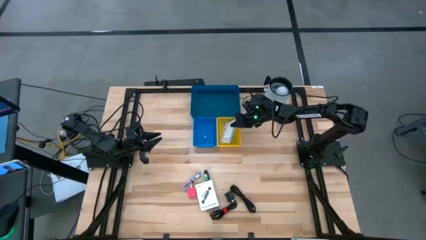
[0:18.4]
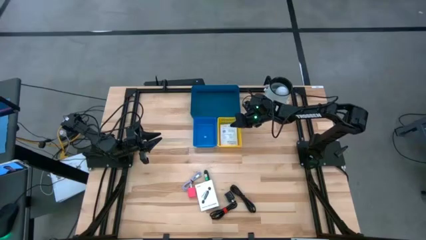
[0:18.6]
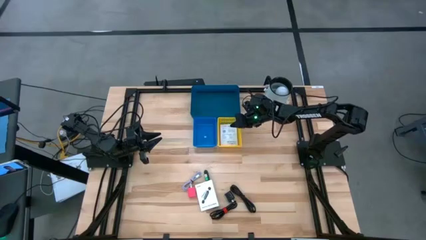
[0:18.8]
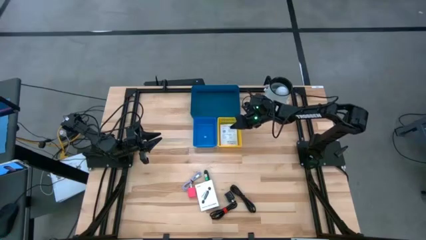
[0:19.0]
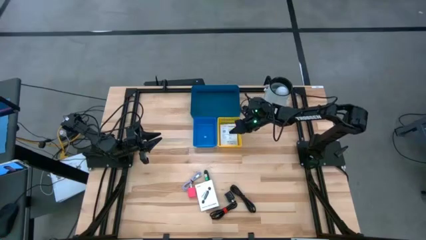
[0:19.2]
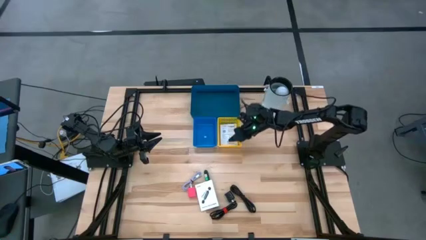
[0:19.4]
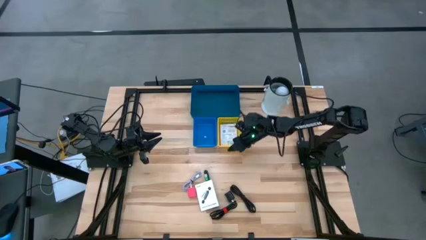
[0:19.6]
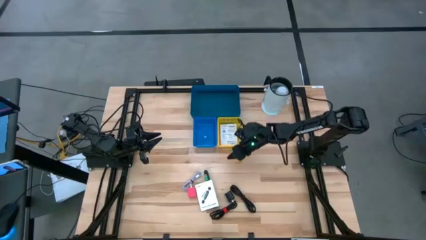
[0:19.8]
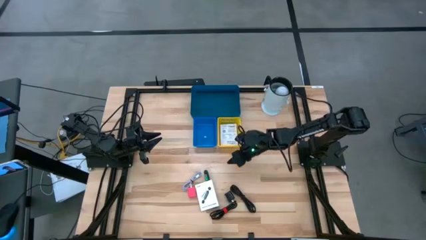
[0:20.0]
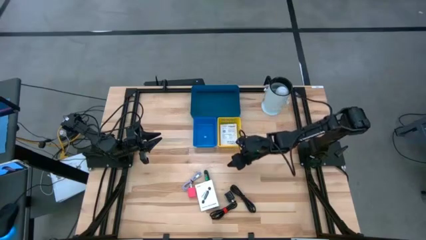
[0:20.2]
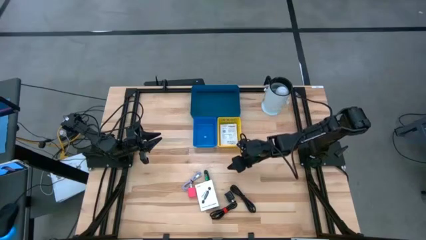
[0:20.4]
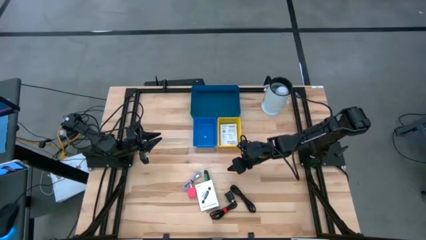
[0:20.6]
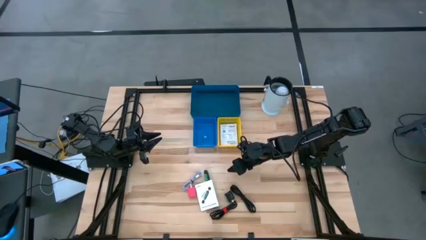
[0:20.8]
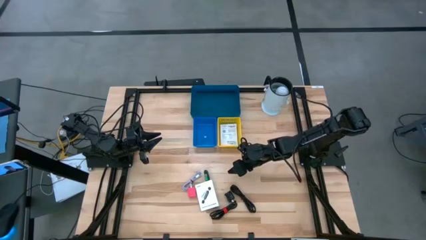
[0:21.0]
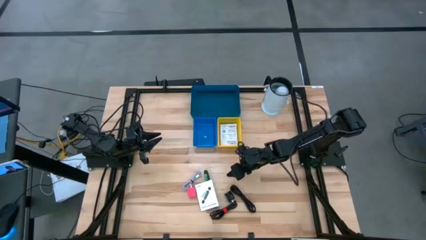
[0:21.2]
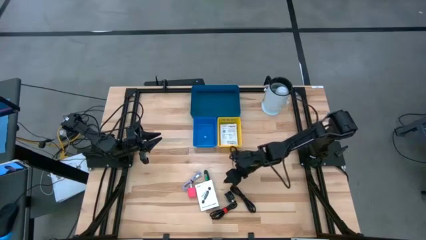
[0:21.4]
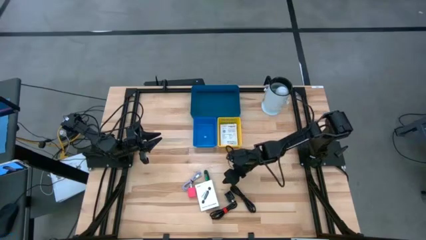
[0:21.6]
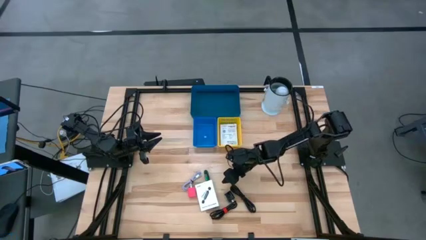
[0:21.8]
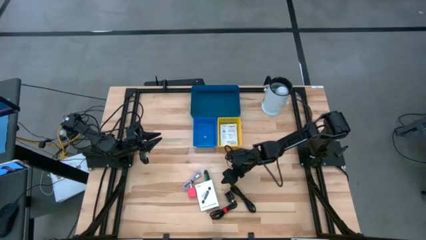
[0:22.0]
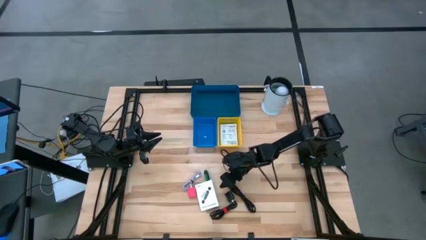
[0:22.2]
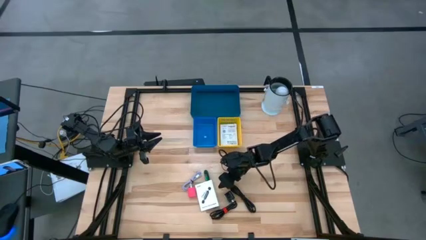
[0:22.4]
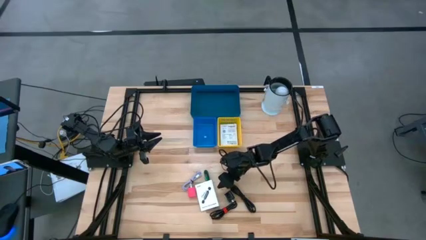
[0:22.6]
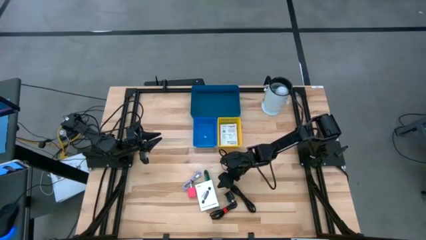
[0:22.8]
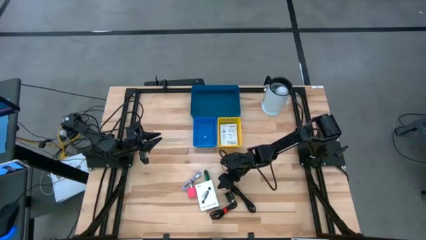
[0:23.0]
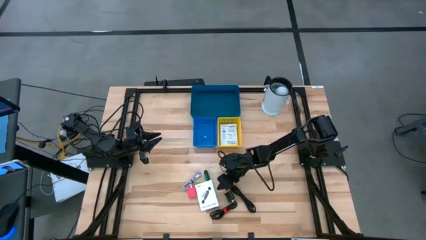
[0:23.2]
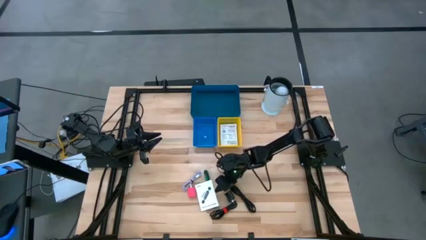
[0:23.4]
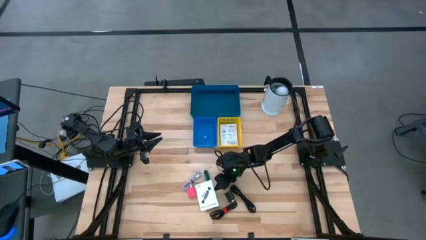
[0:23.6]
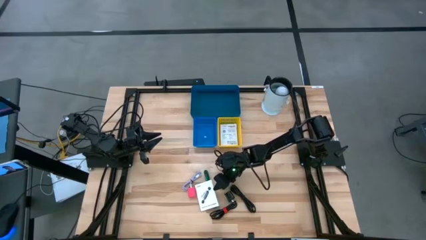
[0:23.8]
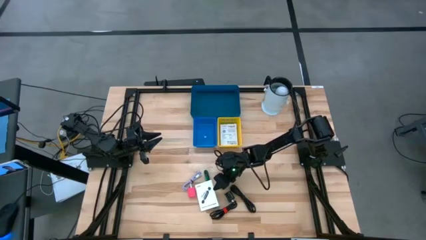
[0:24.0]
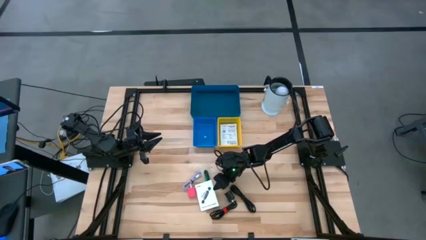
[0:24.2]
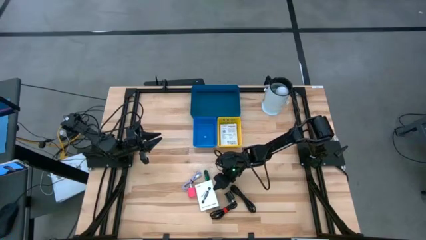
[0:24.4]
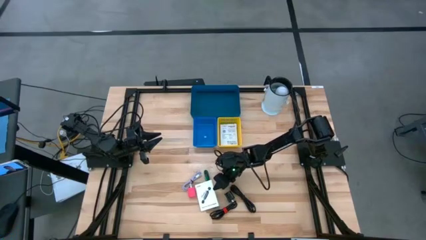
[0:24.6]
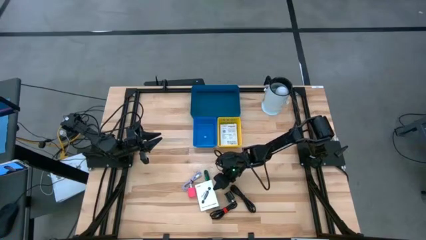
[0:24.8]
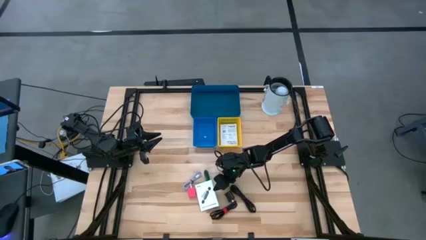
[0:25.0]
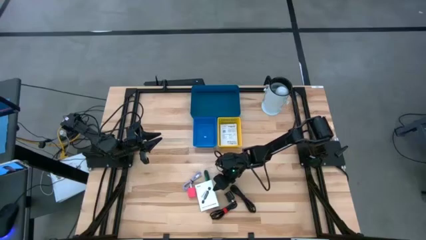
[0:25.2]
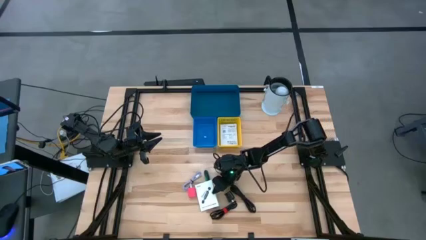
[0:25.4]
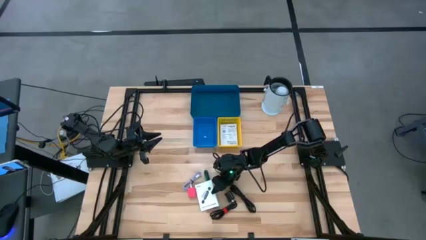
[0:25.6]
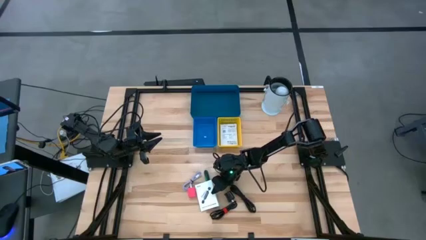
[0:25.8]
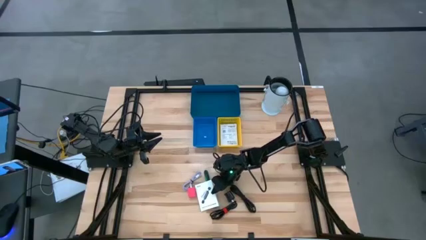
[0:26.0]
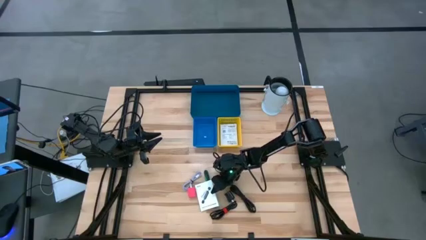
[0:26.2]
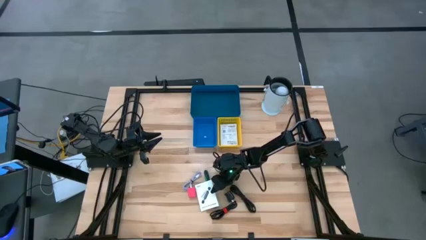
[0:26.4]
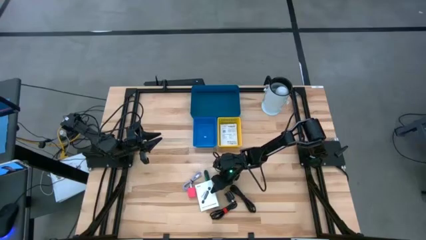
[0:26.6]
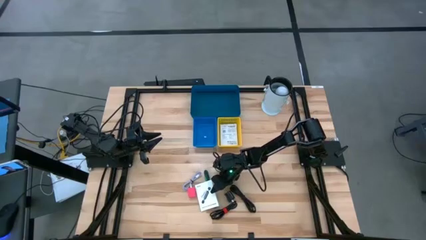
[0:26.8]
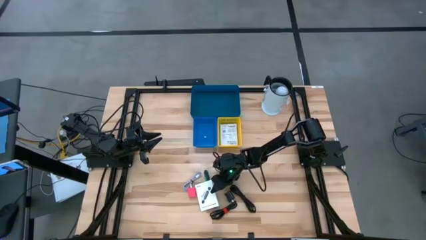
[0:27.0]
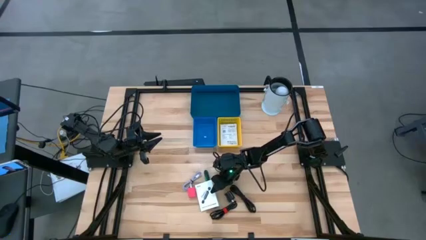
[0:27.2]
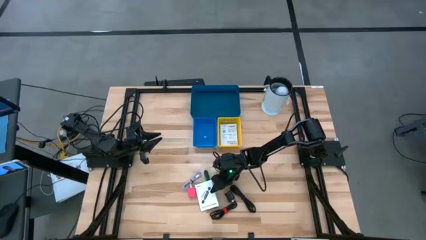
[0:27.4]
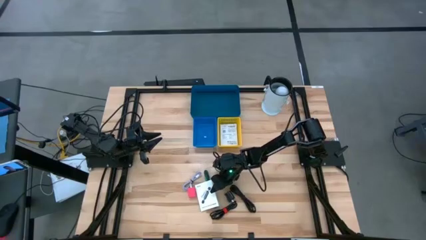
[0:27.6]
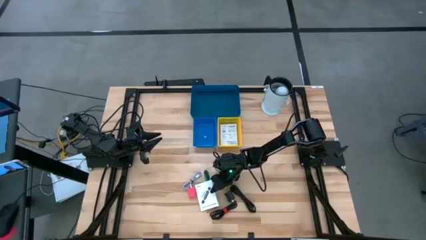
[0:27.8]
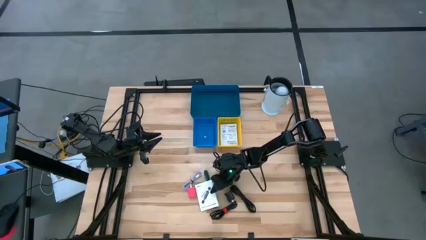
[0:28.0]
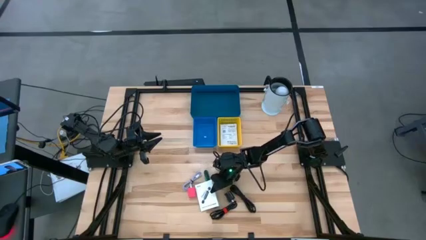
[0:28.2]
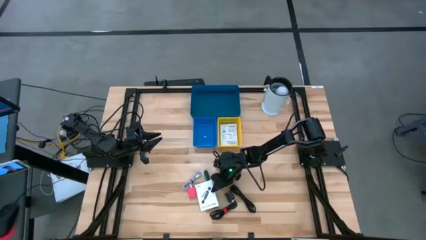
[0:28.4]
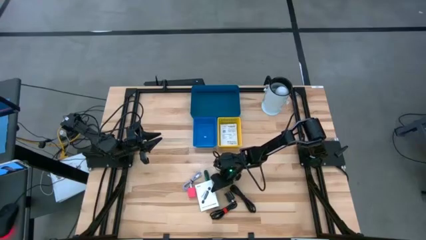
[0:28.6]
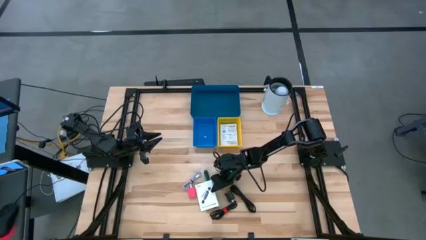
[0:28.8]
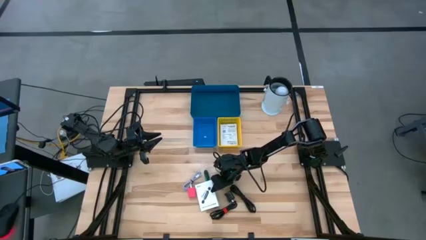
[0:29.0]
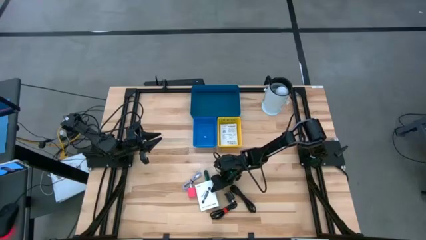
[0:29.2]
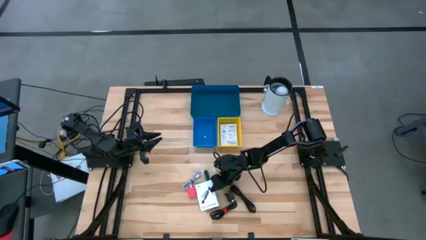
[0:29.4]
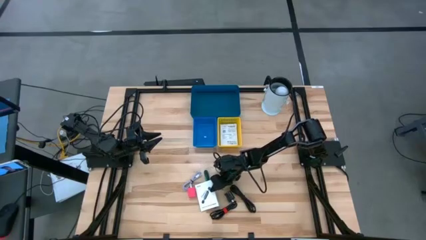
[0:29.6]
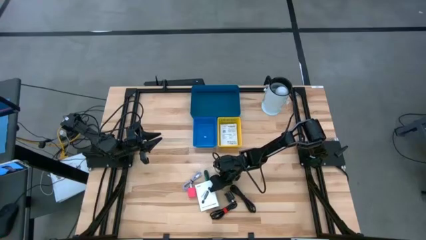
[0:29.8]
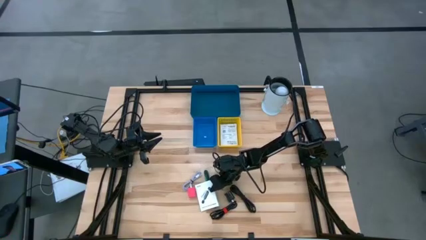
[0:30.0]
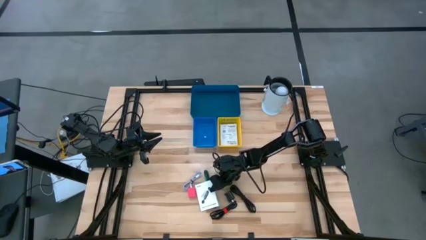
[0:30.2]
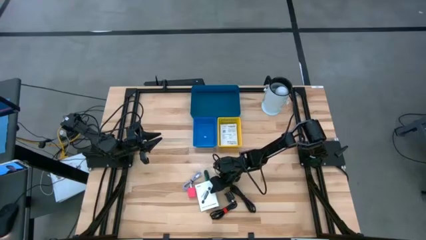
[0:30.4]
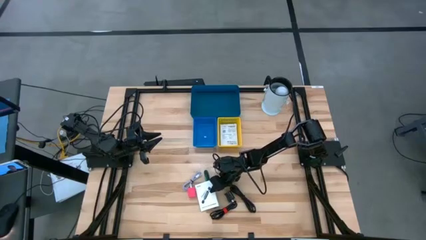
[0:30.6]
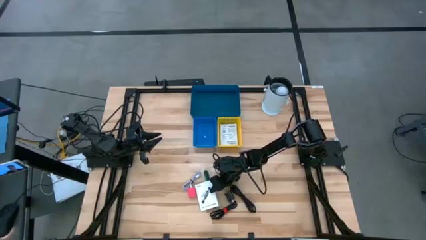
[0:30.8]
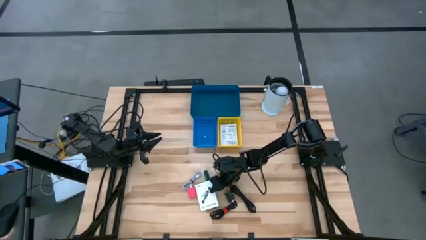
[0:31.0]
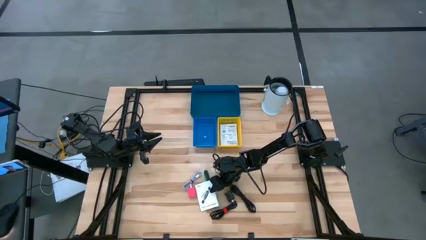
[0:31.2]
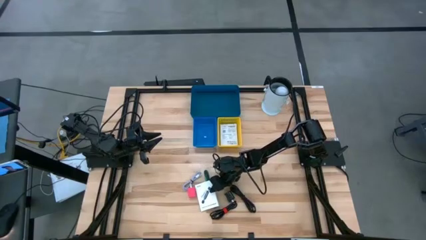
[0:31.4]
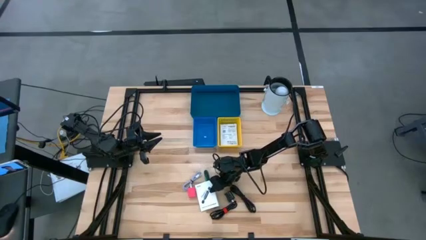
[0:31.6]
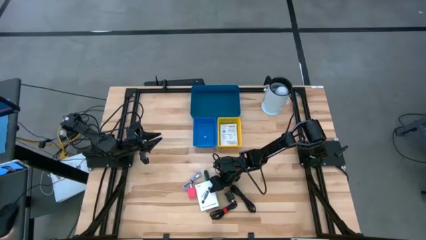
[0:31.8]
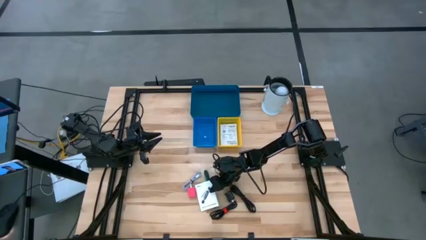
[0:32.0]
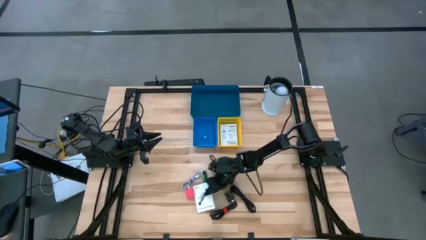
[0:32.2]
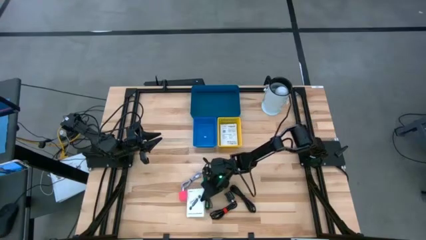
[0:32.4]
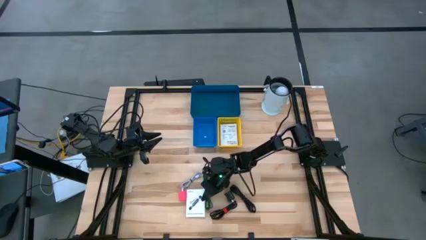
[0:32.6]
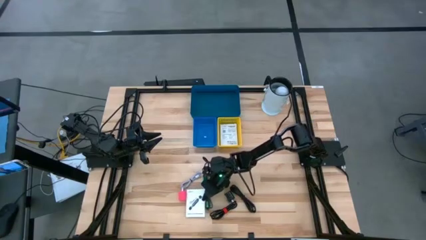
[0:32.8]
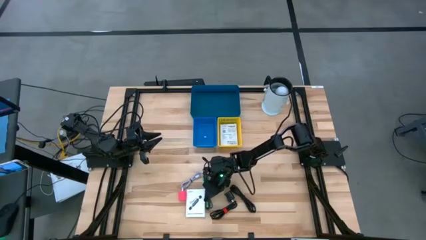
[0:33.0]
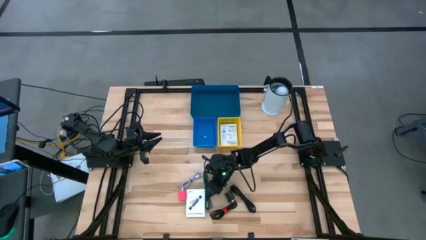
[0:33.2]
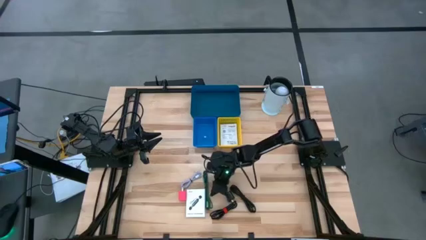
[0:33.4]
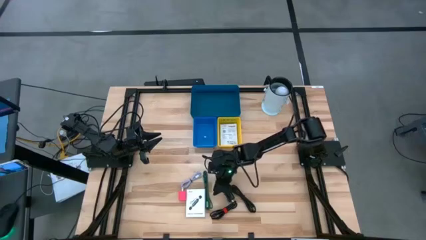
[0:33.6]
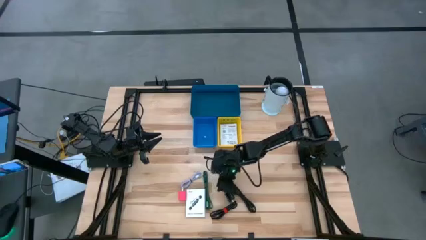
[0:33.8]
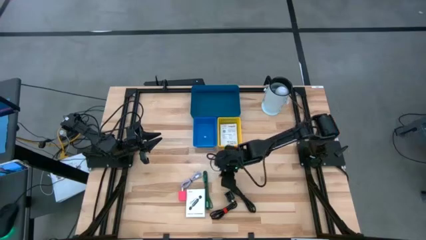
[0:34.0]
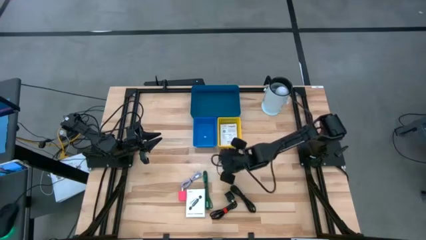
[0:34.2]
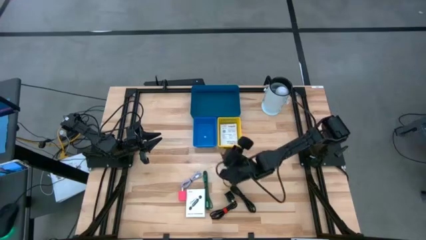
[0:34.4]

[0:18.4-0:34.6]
Task: Pick and place items into bin
Put the white card reader box into the yellow bin
